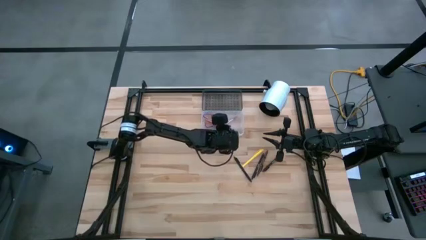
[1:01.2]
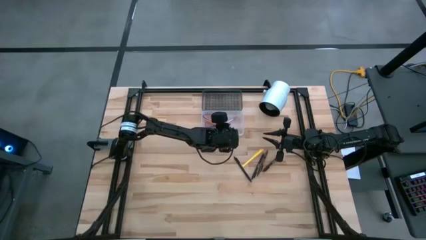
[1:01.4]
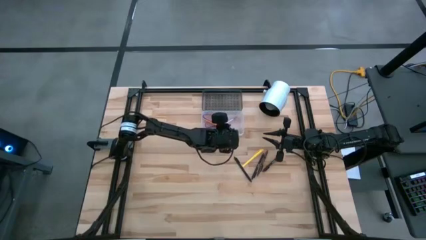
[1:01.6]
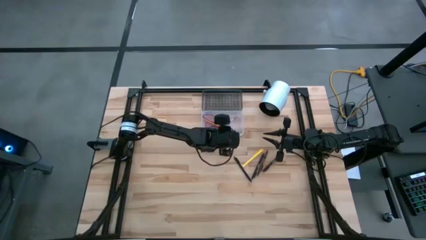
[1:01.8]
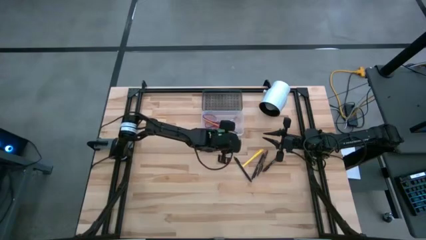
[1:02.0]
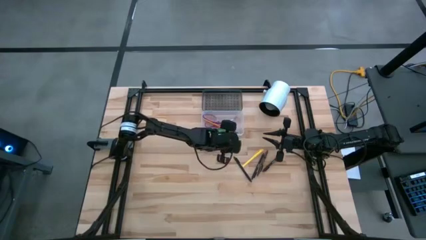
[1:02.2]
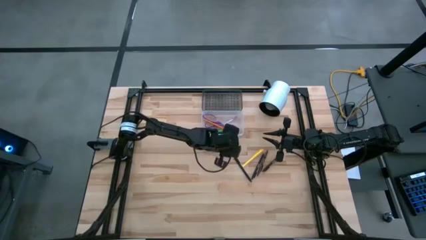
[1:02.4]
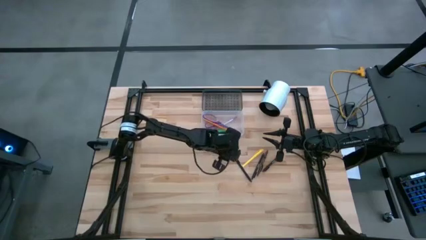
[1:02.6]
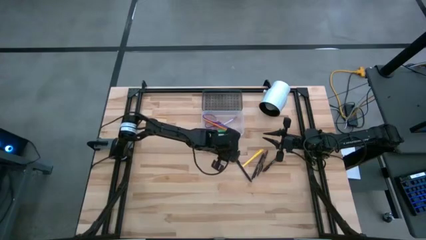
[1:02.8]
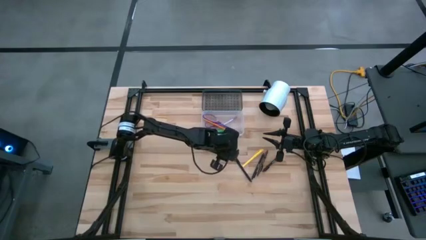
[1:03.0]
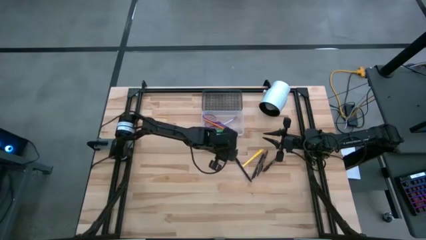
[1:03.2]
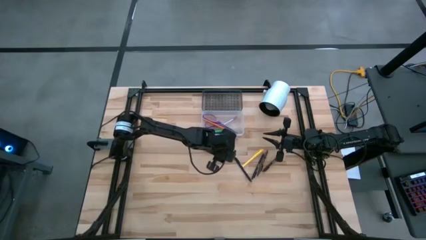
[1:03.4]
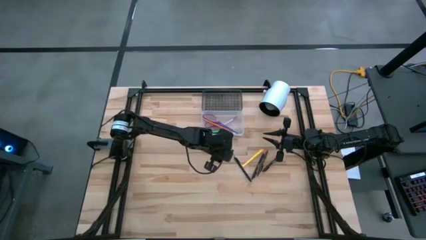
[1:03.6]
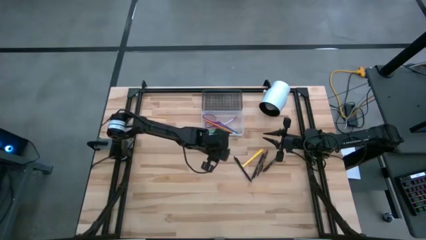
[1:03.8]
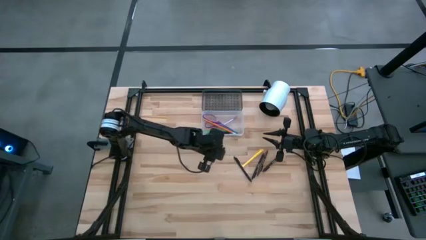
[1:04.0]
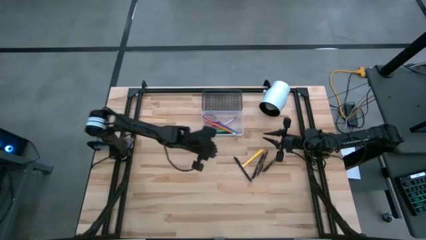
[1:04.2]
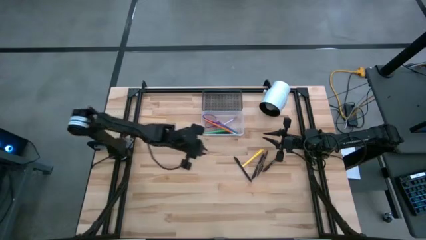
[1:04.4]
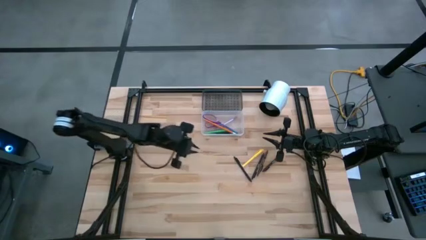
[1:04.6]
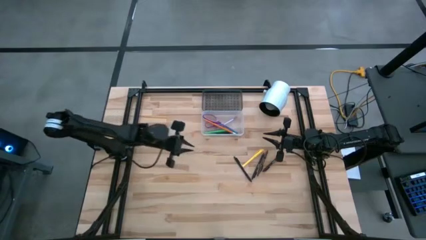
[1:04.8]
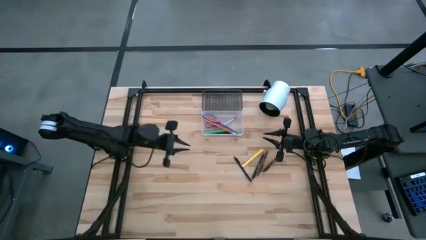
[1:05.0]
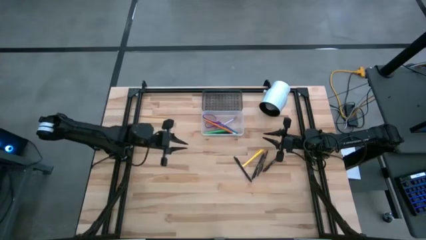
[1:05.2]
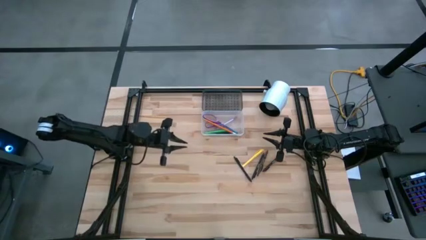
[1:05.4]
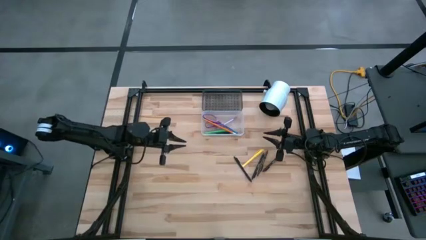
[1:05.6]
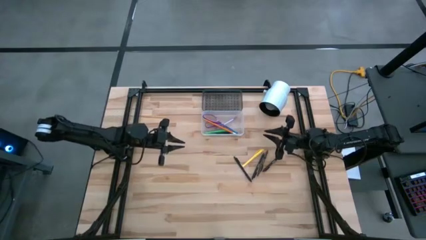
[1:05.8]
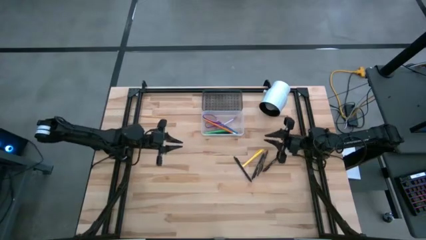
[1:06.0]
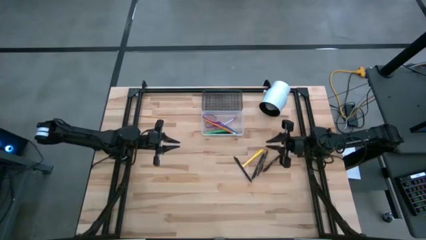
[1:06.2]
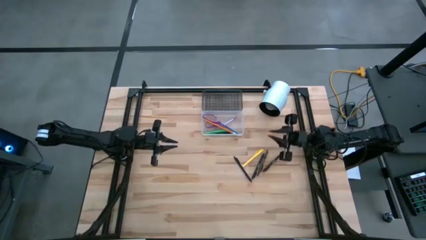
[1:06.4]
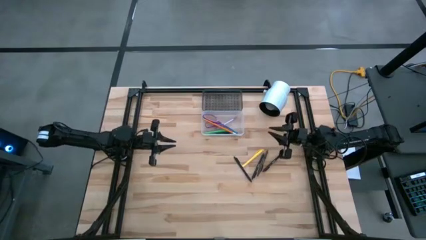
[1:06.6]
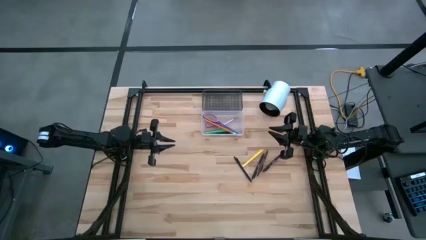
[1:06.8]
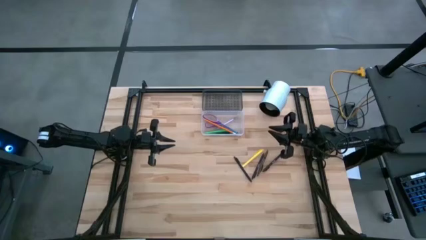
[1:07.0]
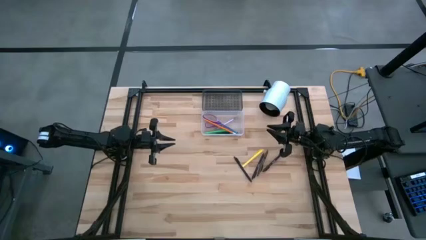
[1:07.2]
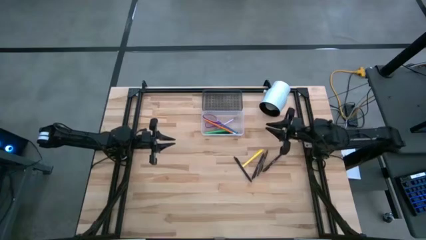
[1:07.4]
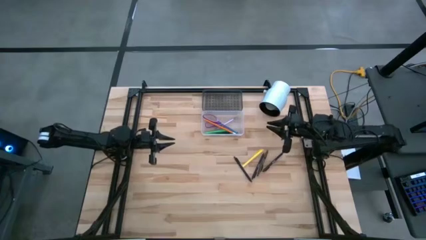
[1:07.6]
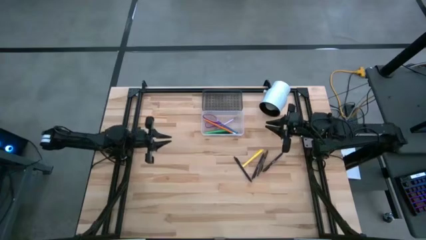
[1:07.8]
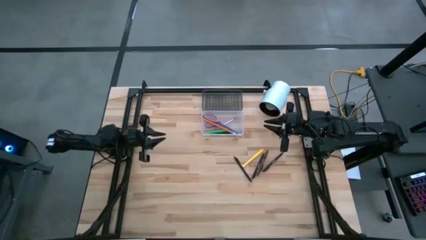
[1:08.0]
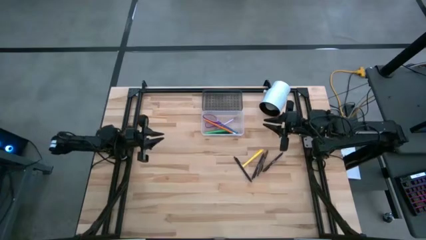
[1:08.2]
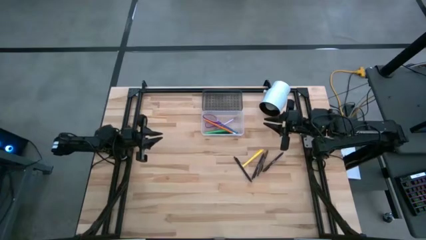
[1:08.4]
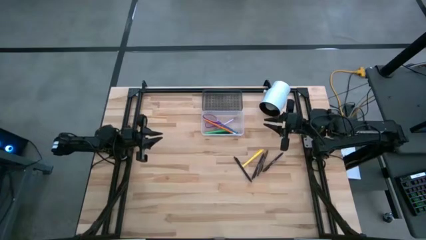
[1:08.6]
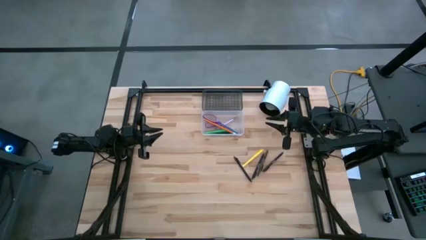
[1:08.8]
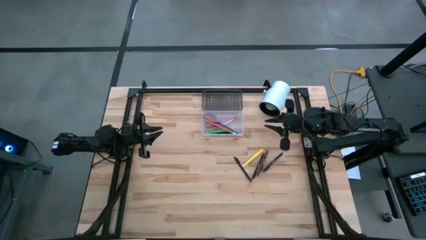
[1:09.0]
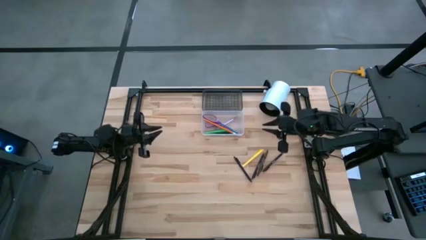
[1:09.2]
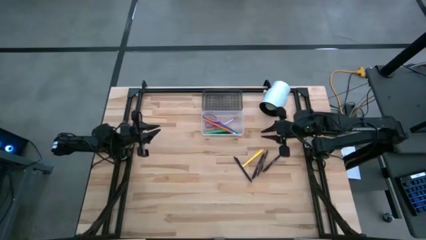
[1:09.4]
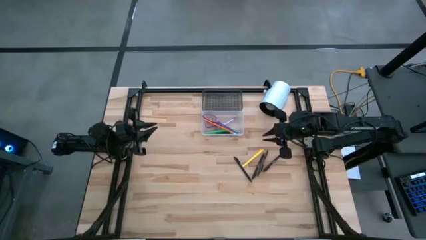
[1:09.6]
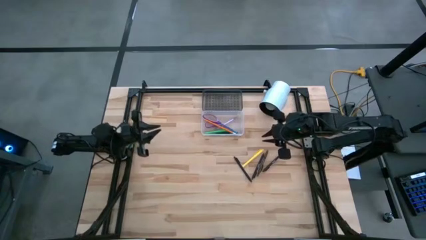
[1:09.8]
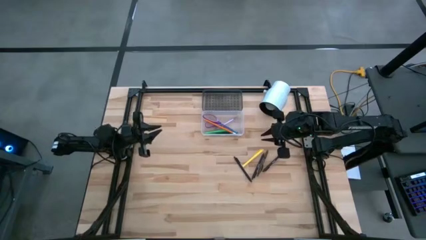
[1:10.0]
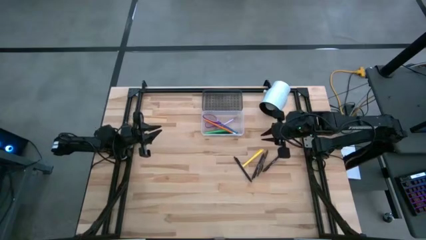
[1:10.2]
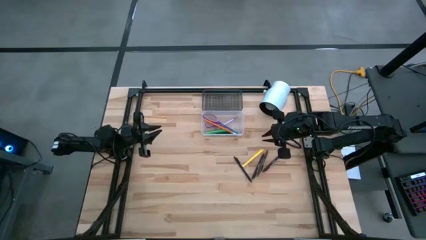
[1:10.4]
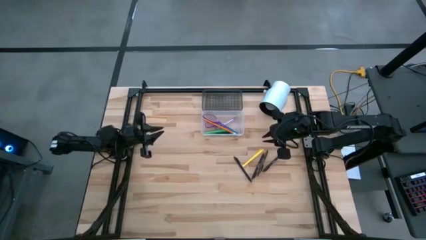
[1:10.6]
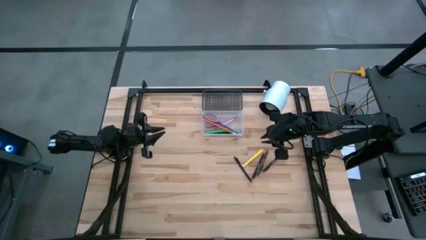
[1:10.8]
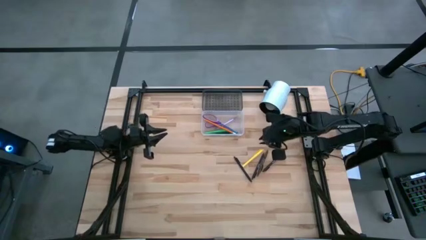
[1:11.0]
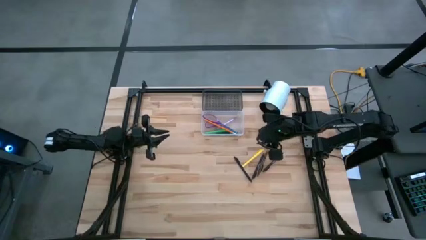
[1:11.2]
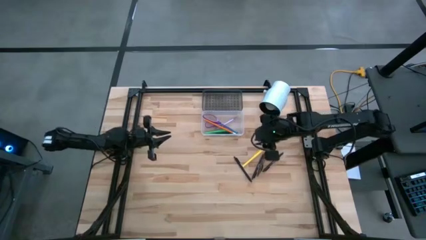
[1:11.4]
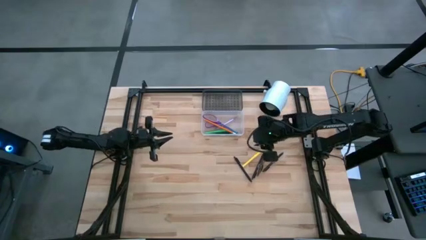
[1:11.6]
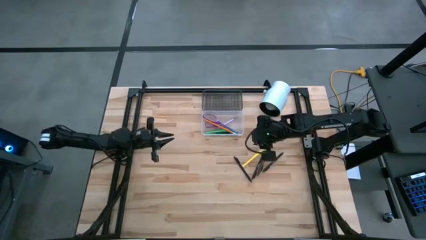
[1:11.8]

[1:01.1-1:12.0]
Task: Pick & place school supplies into a supply box
Put the black pen into the black box

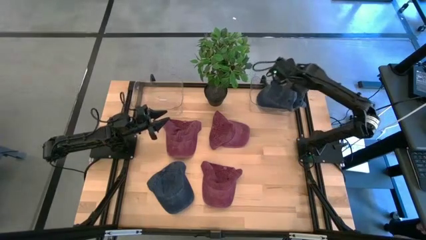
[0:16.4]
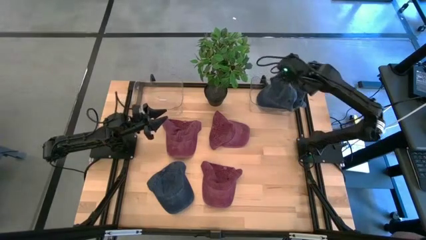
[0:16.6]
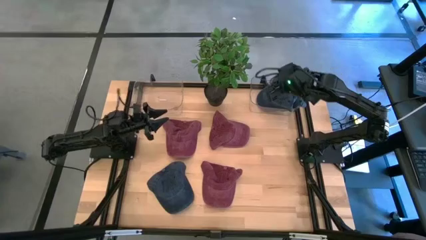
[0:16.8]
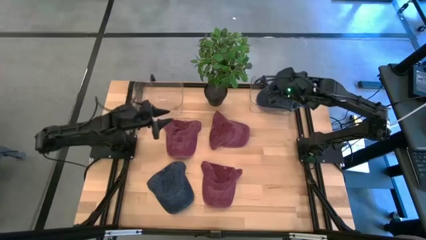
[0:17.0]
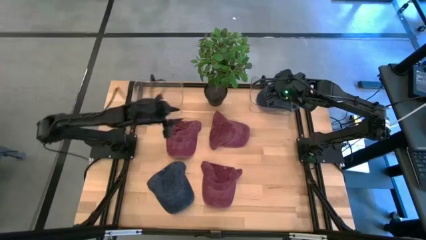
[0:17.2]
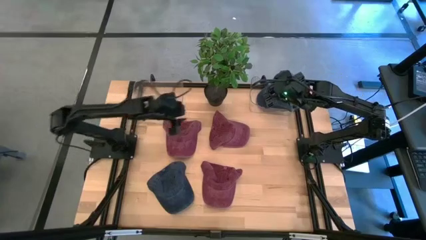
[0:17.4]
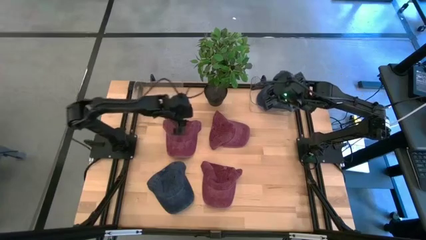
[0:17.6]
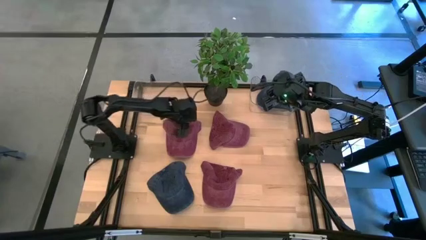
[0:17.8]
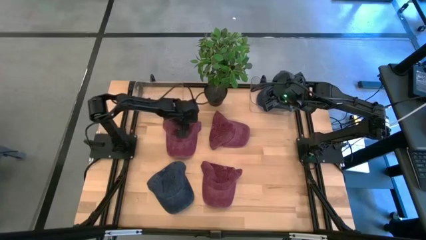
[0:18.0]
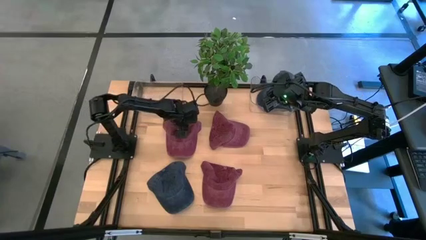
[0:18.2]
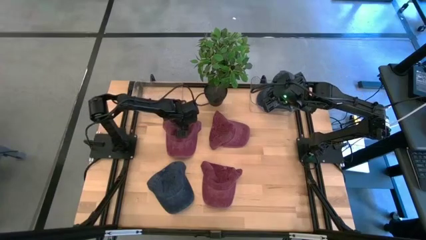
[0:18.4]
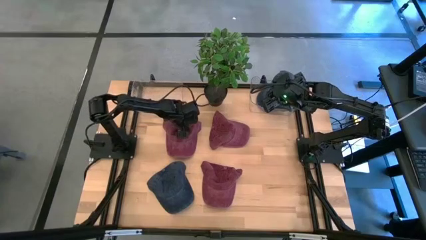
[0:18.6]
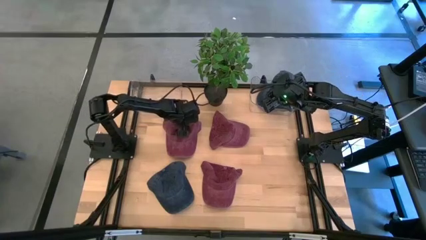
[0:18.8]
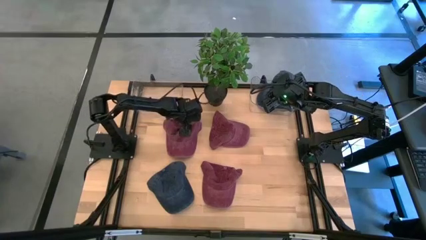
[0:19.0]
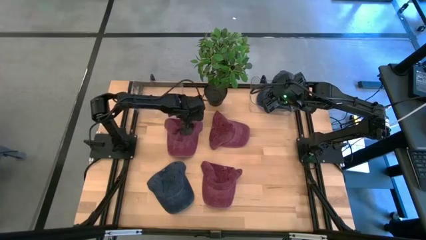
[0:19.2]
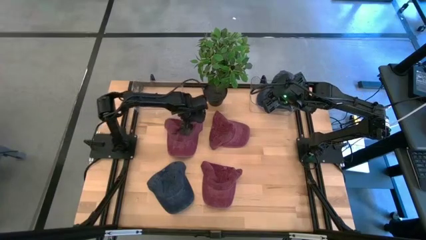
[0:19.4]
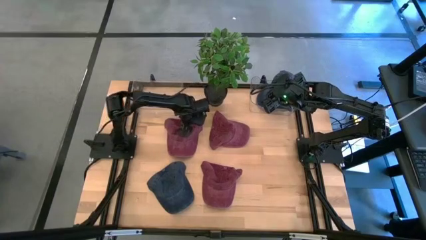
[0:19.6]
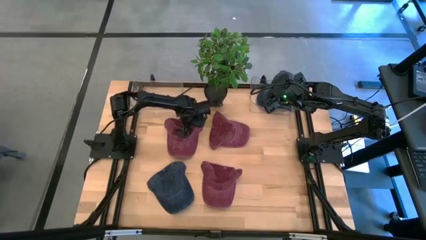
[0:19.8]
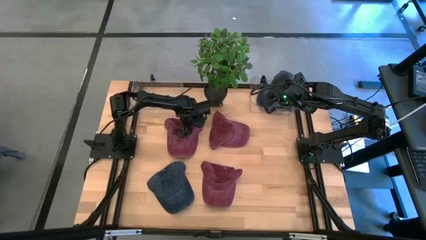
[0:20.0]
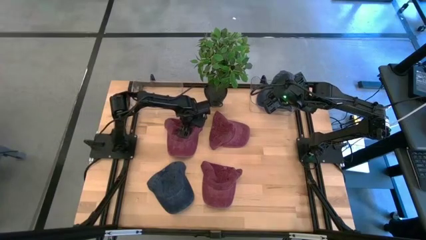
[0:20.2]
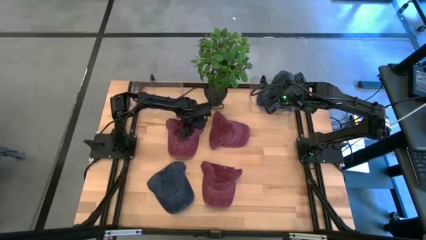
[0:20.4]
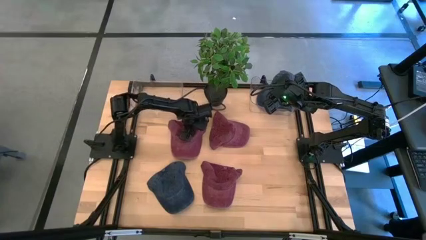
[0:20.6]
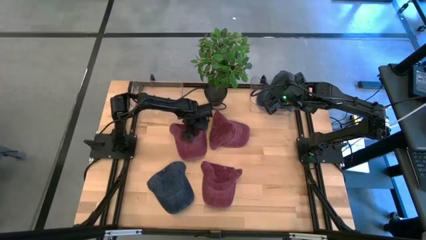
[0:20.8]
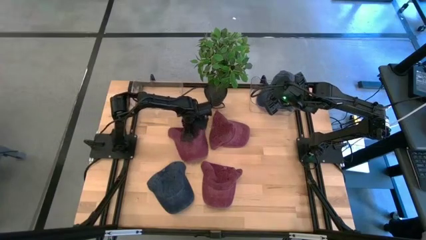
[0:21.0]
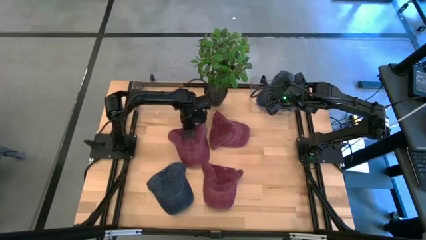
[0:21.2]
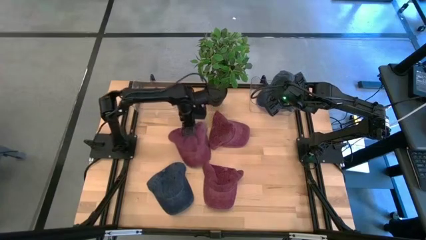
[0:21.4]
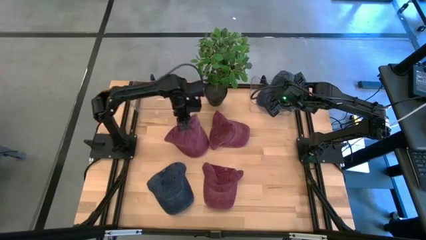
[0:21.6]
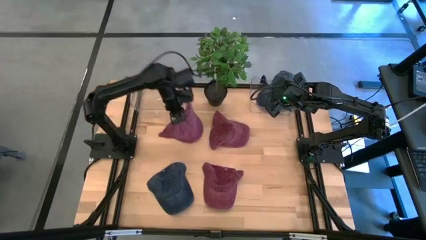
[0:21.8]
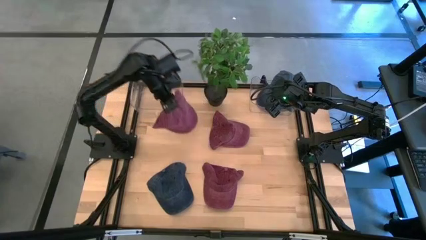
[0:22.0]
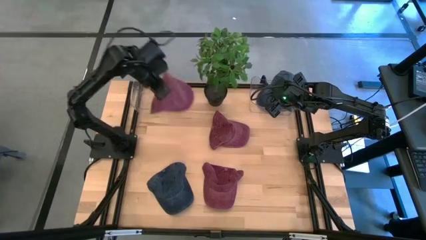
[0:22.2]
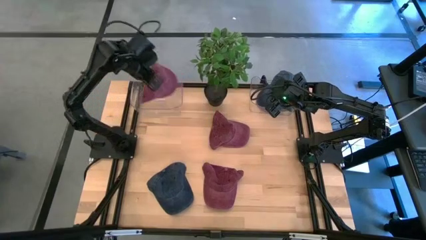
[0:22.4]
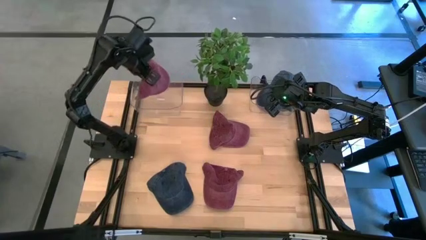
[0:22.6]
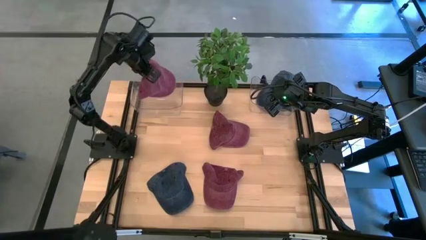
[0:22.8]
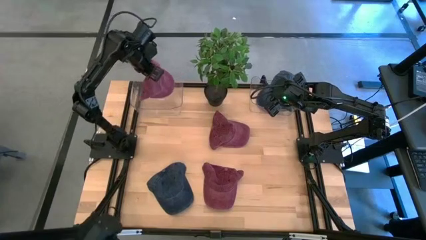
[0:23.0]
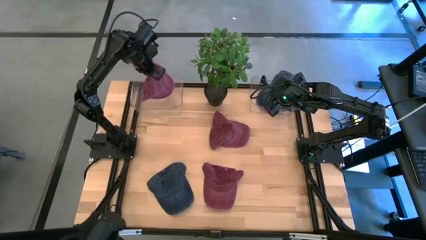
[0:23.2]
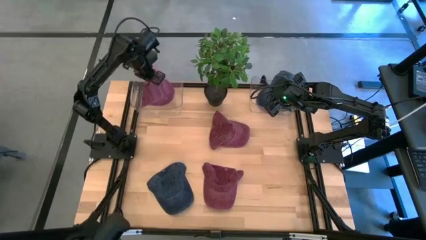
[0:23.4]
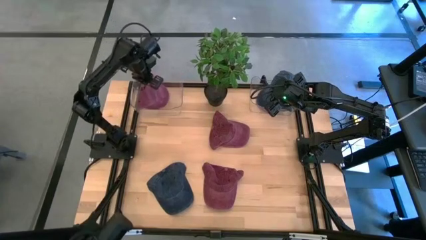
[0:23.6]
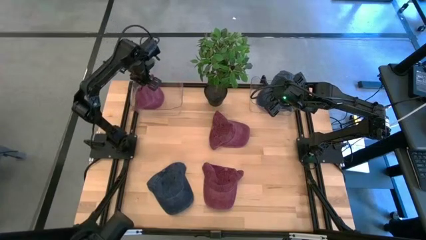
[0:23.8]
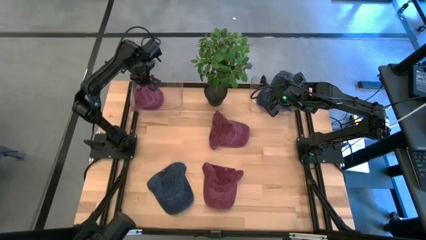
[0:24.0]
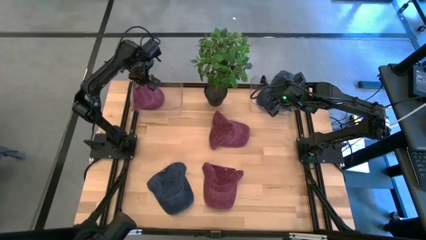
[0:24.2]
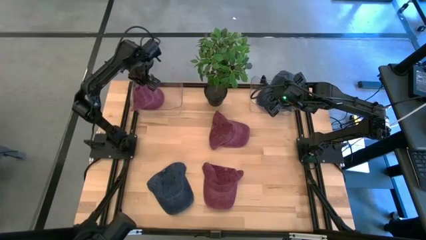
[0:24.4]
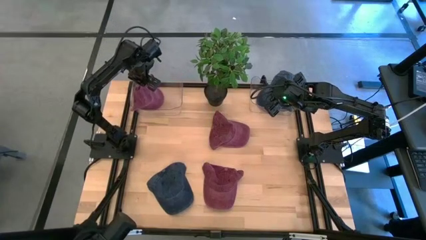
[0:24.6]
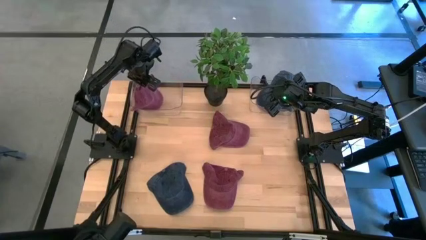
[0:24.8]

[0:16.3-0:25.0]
Task: Pick & Place hat
Put the top left red cap into the left transparent bin
